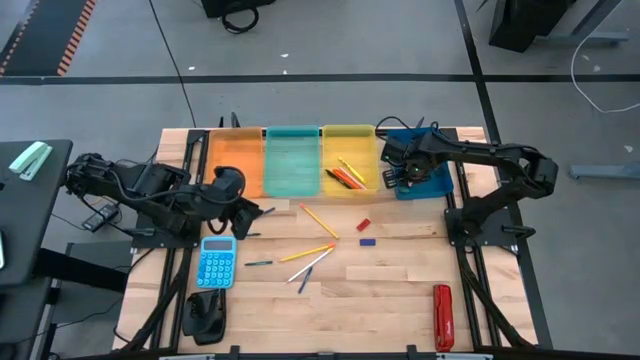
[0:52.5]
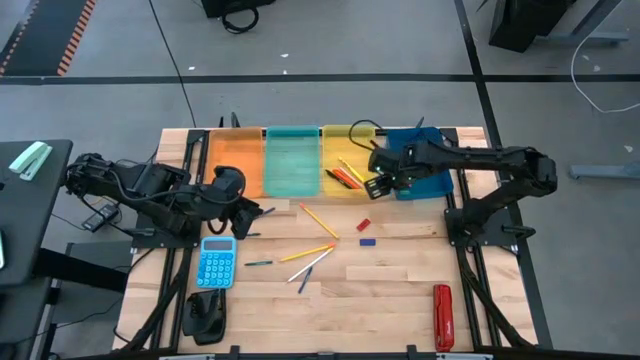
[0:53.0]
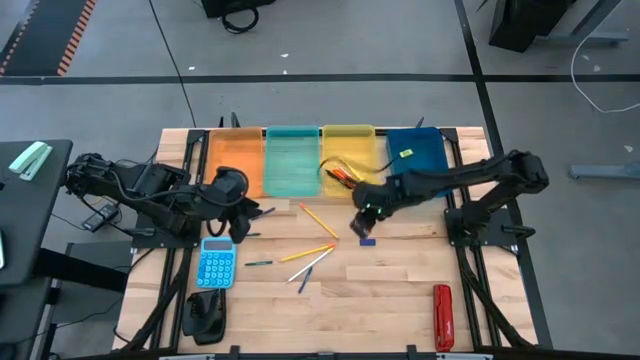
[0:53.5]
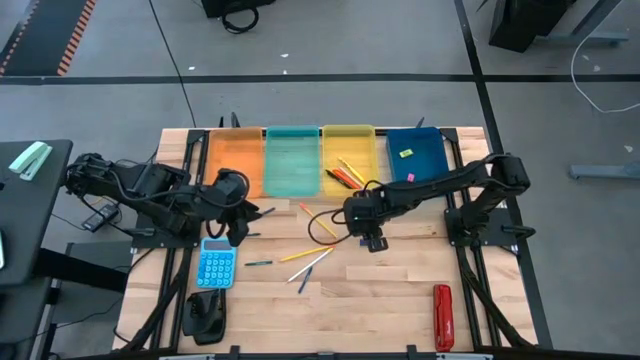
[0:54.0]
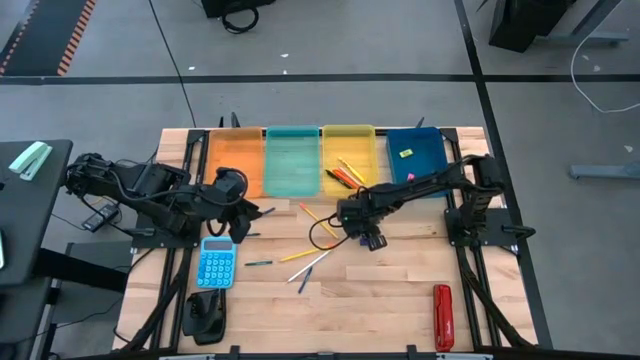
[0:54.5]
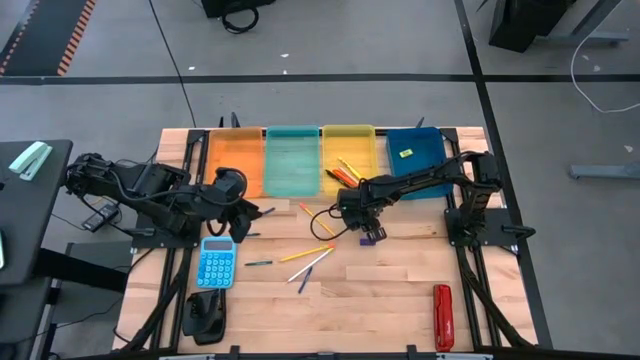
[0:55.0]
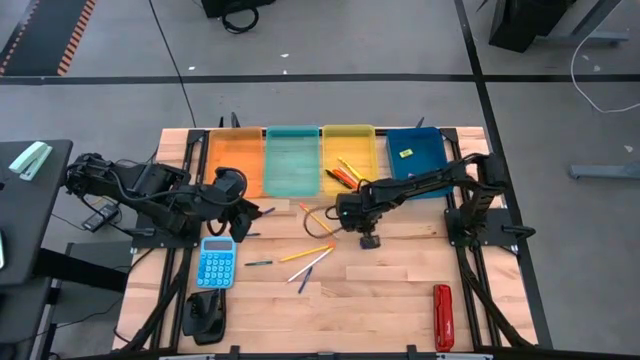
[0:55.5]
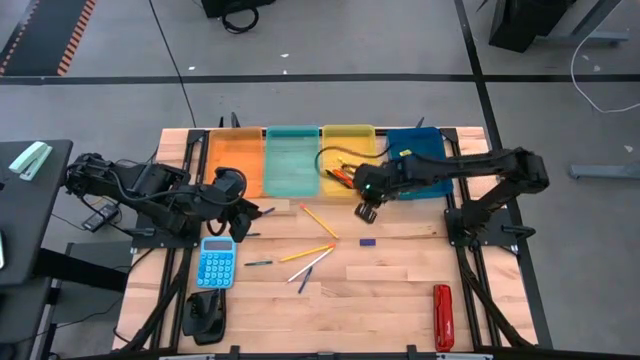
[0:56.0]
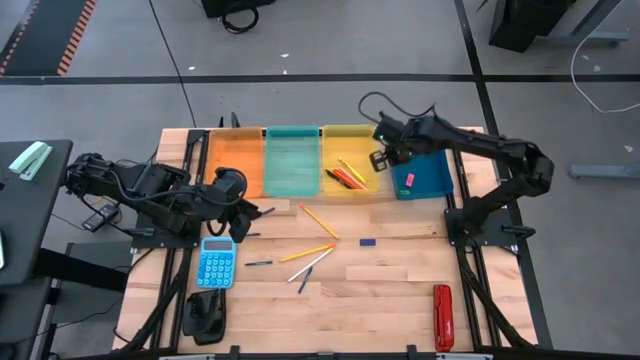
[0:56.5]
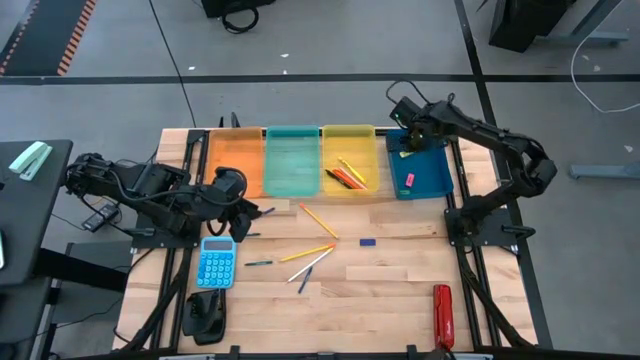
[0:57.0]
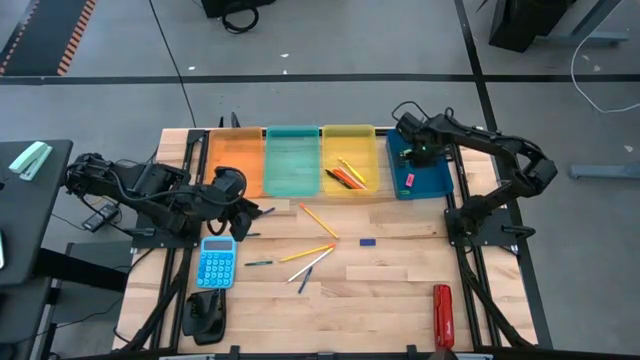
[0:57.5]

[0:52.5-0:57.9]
Task: Sort crayons/erasers/pens/pencils in bins
Put the red eraser into the blue bin

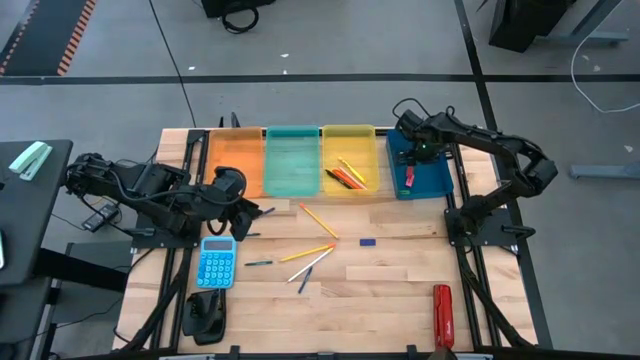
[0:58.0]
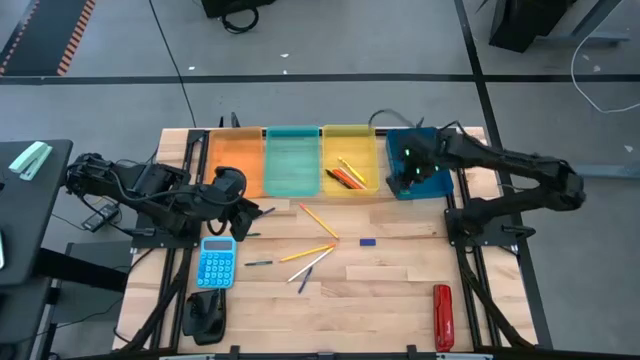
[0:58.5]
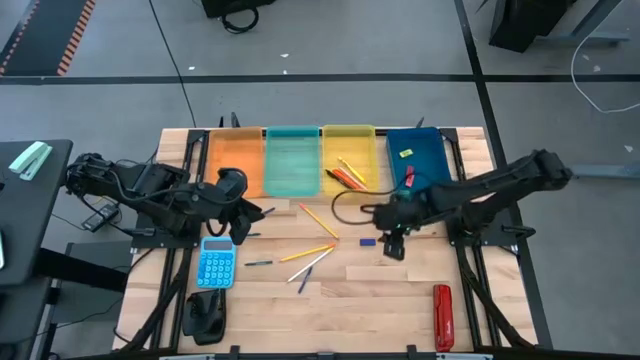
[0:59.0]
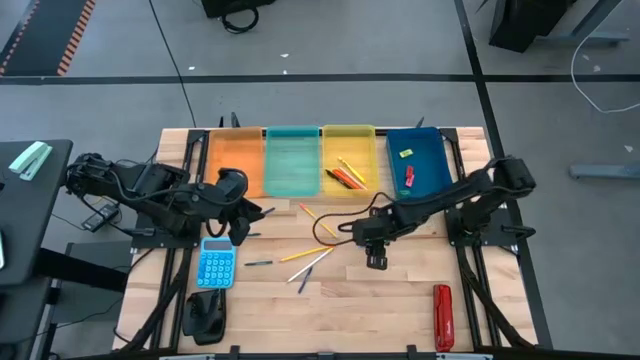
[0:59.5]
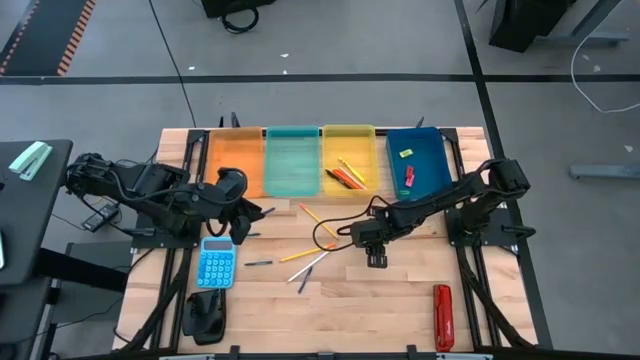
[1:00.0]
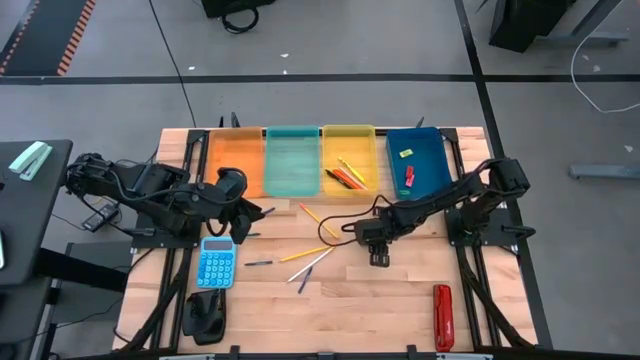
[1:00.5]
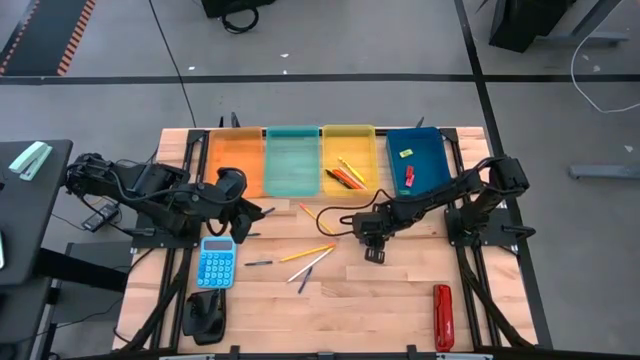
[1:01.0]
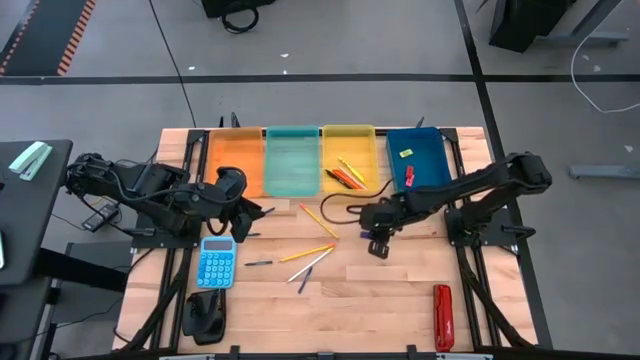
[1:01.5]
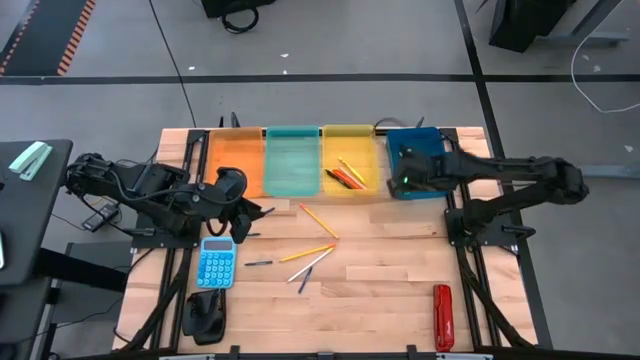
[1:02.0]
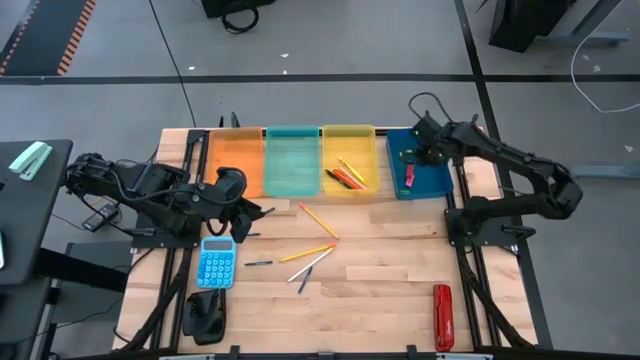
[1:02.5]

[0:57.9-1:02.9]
Put the blue eraser into the blue bin

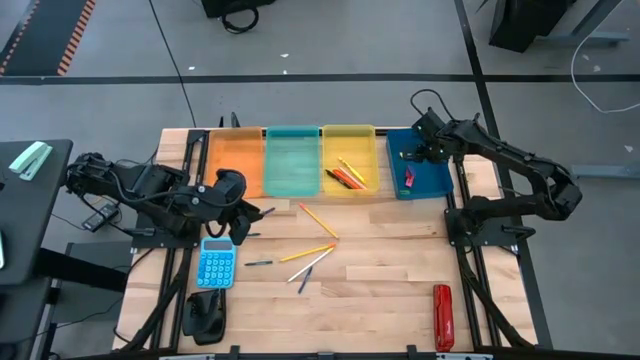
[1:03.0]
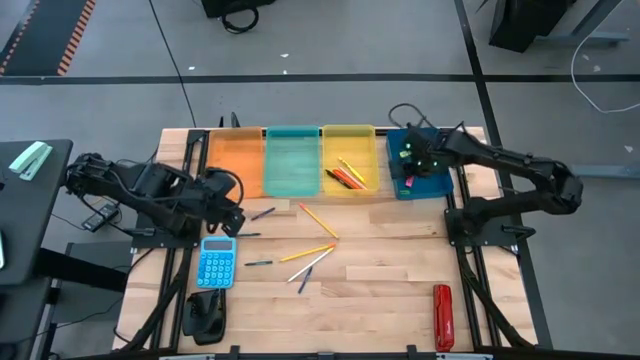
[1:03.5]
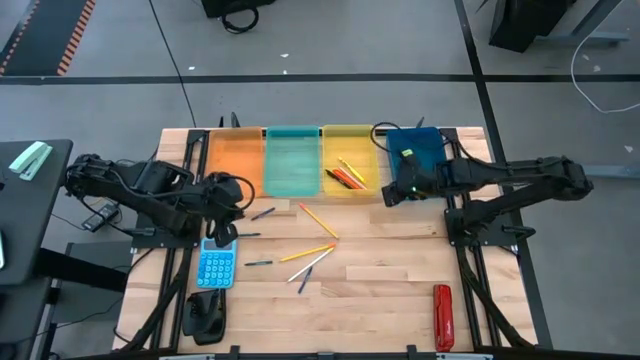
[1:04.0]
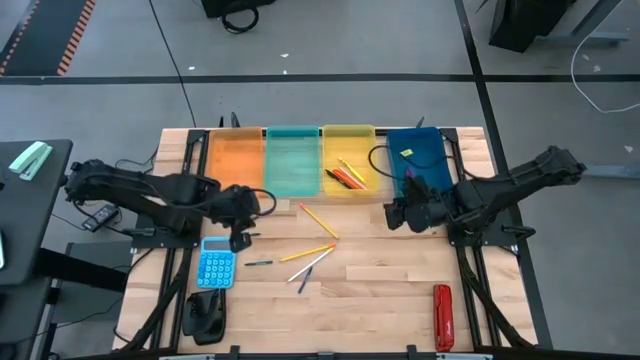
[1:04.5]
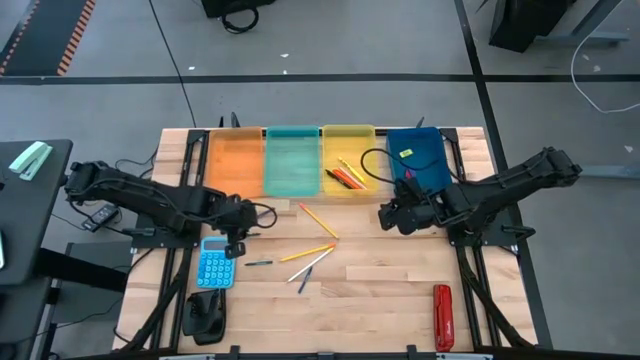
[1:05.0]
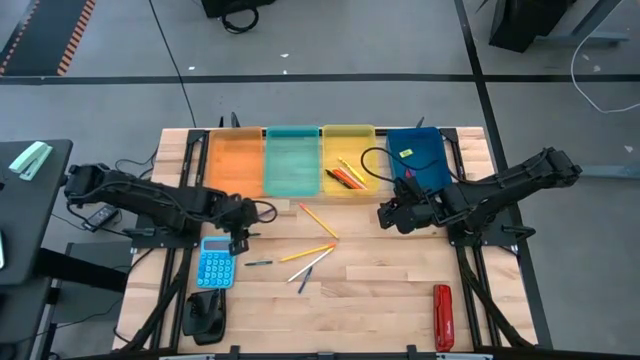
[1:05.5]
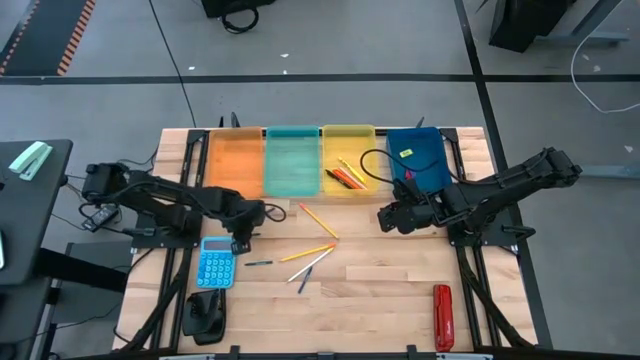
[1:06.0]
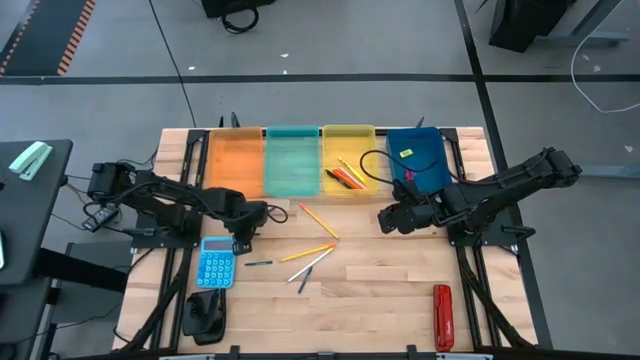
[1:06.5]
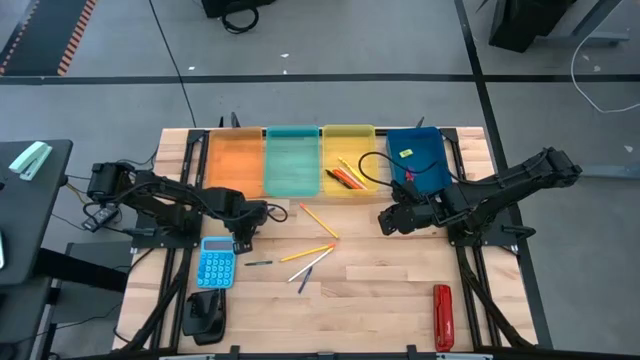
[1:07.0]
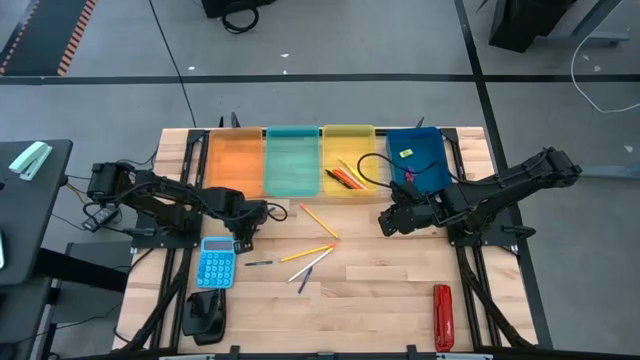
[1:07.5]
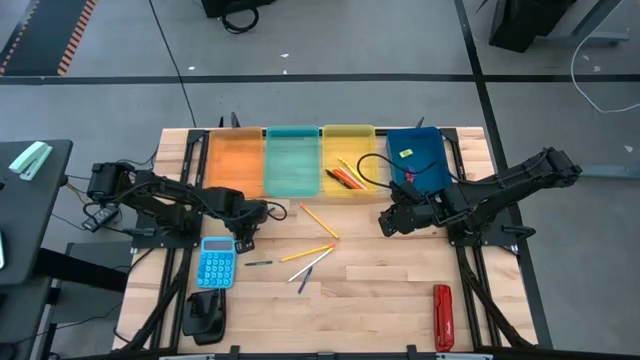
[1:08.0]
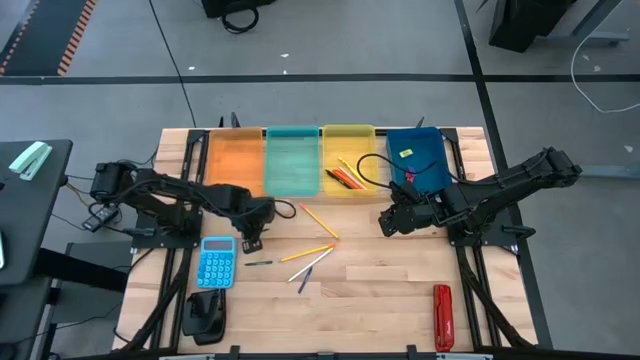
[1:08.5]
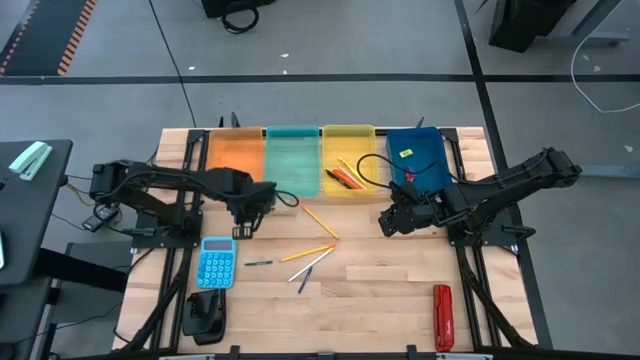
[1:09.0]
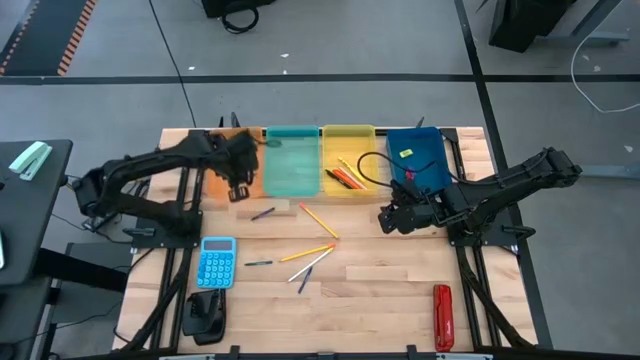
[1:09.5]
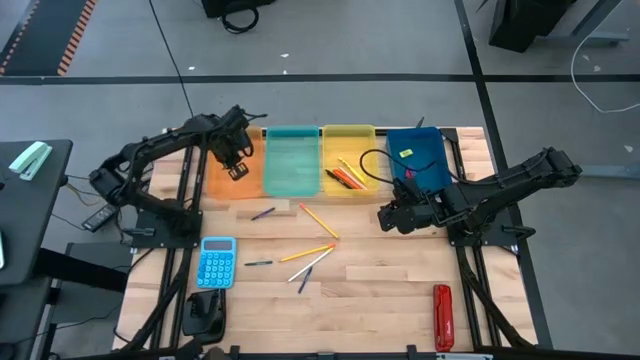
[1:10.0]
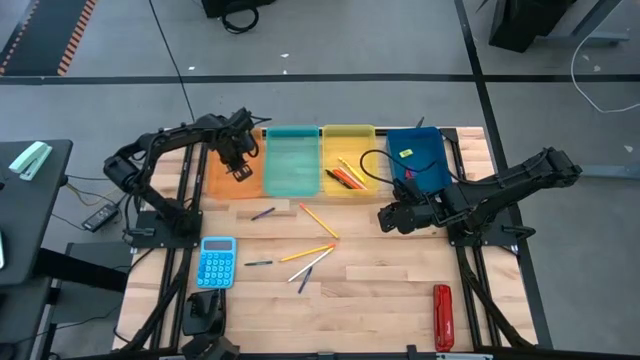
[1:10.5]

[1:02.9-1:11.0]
Put the dark green crayon into the orange bin

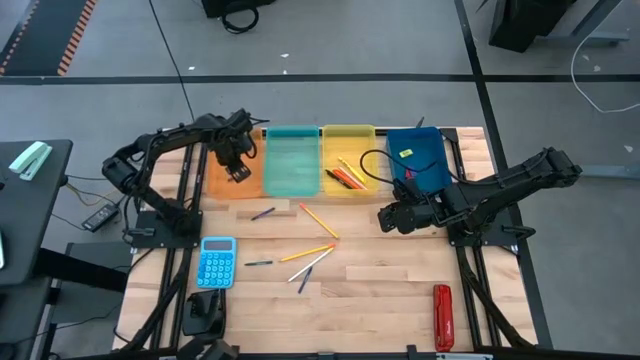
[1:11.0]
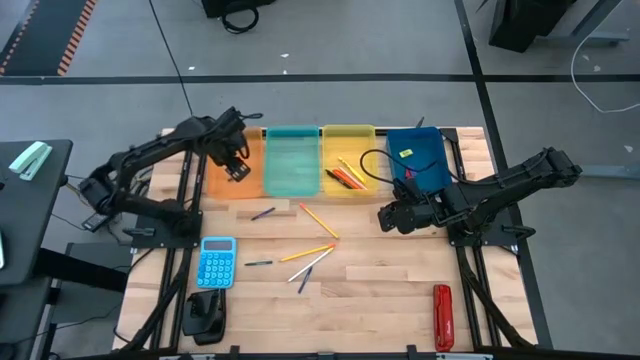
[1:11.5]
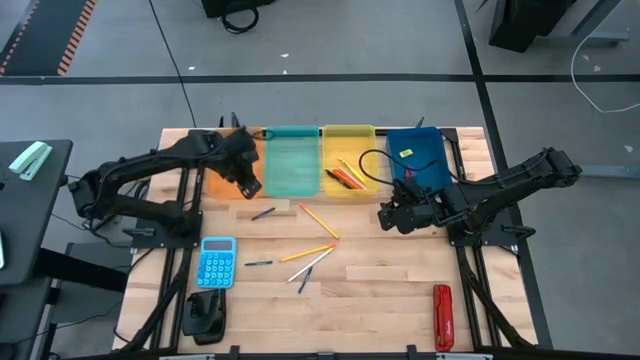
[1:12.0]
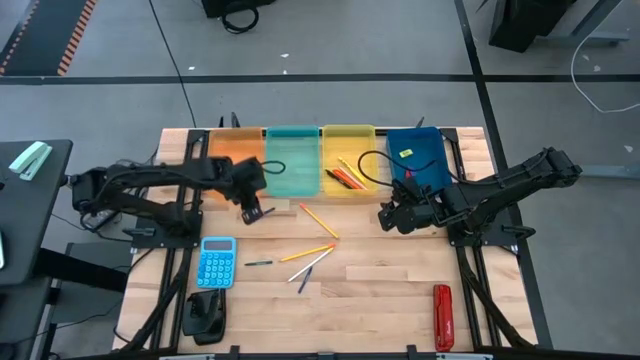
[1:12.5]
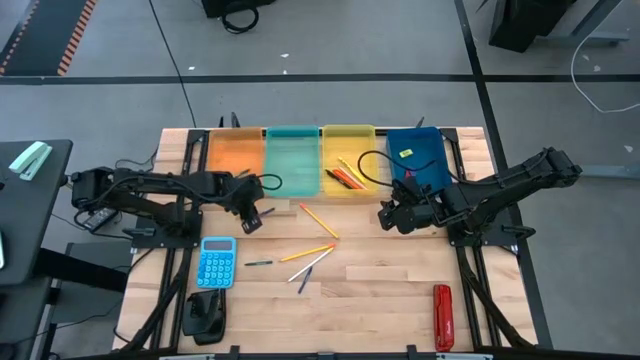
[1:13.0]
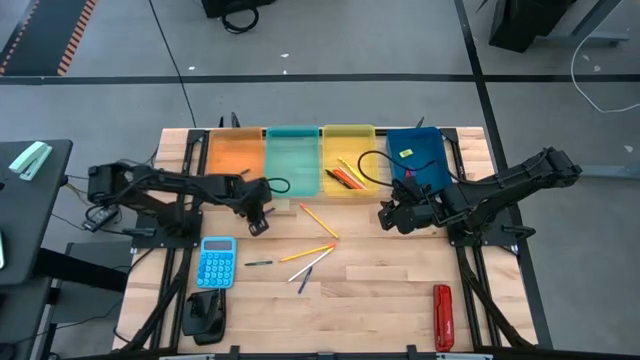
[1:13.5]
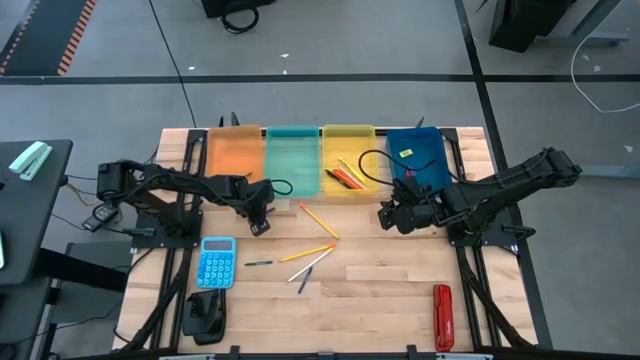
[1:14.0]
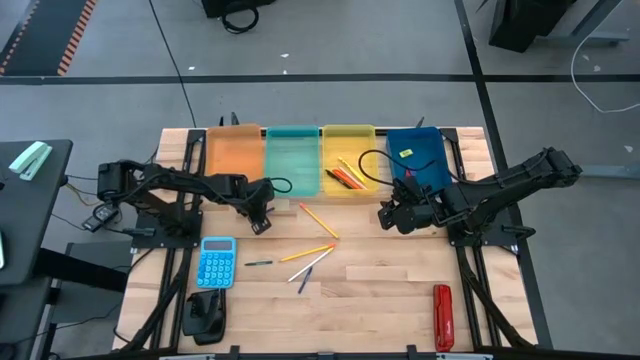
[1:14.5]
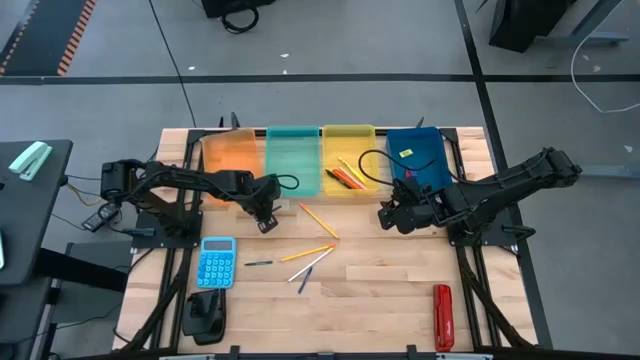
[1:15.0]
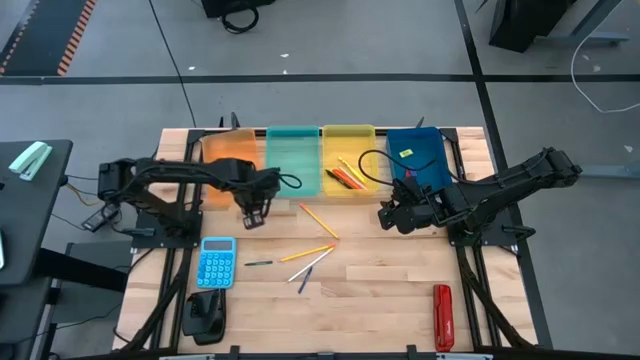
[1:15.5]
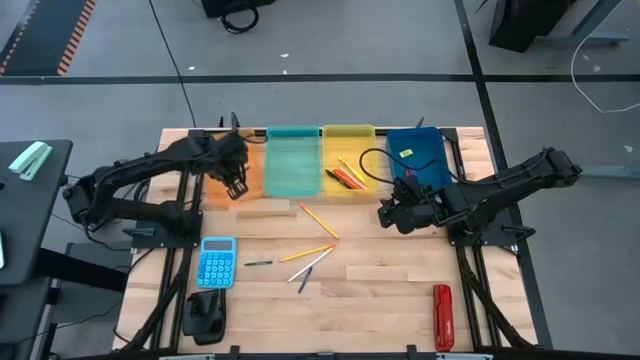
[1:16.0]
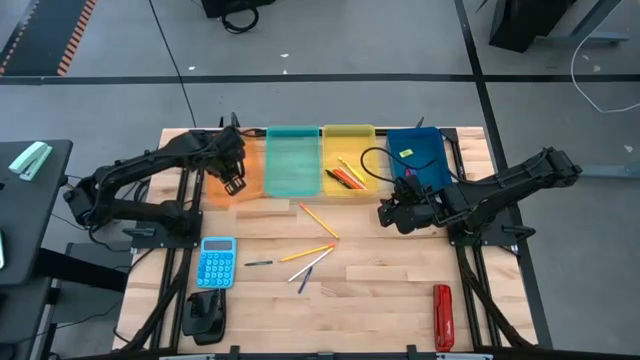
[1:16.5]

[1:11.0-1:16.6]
Put the blue crayon into the orange bin
